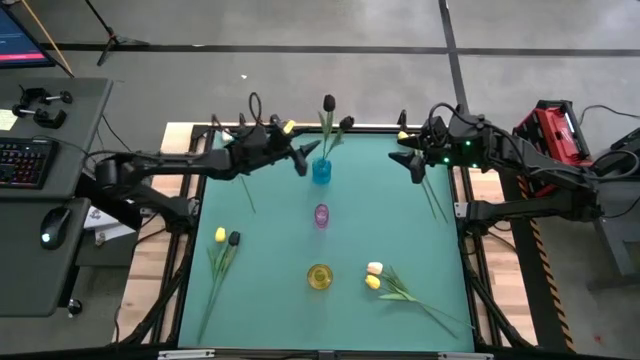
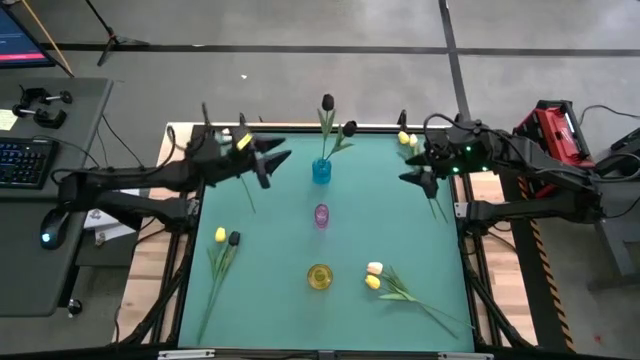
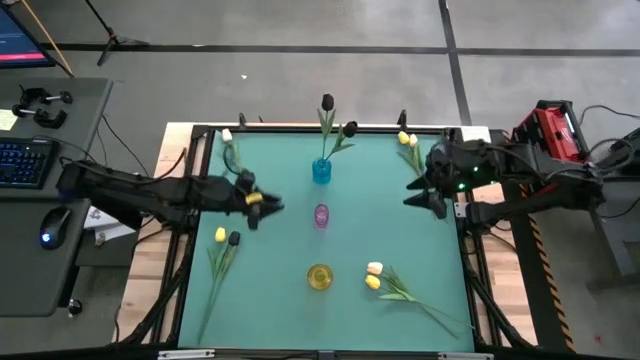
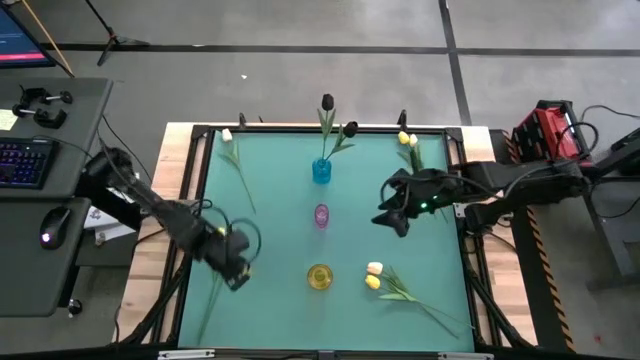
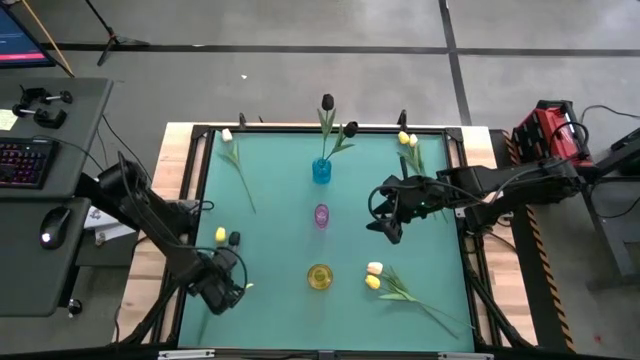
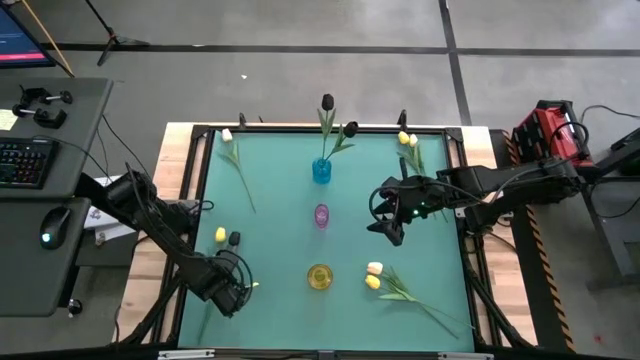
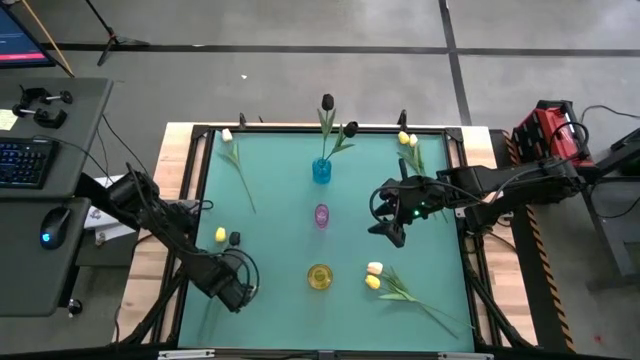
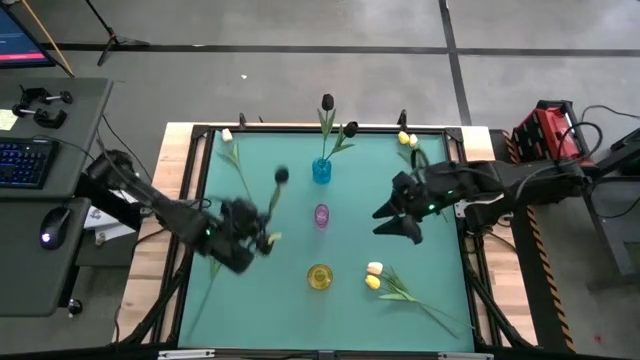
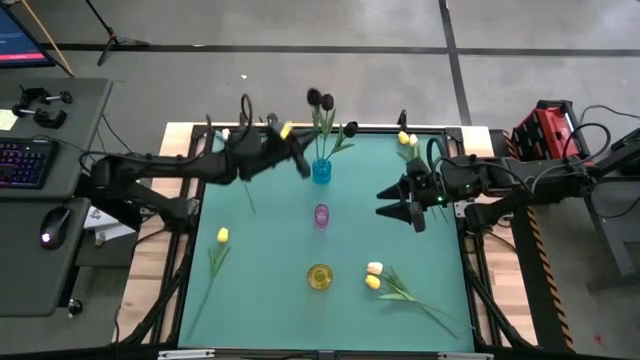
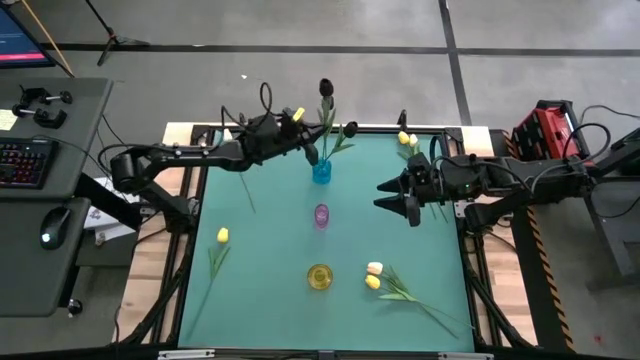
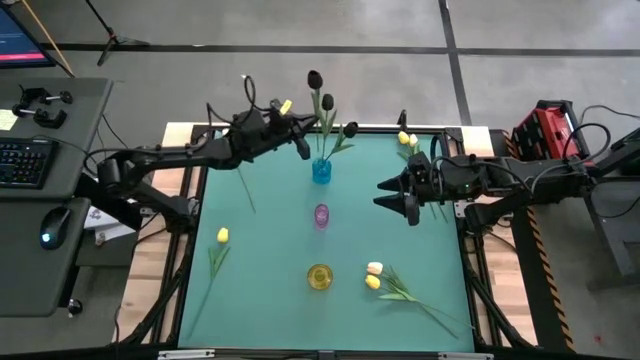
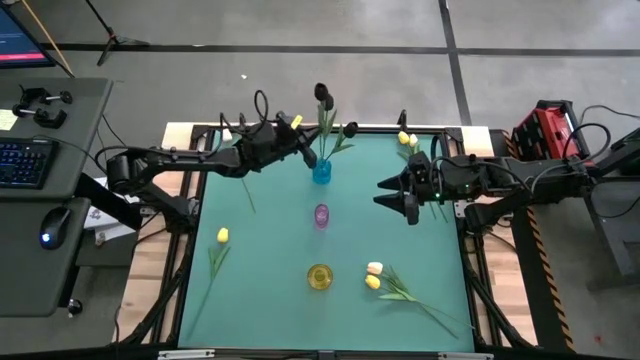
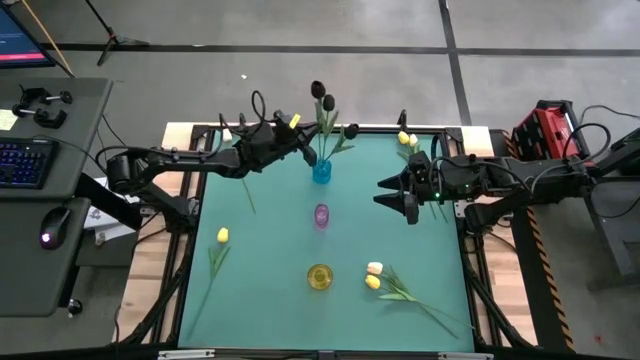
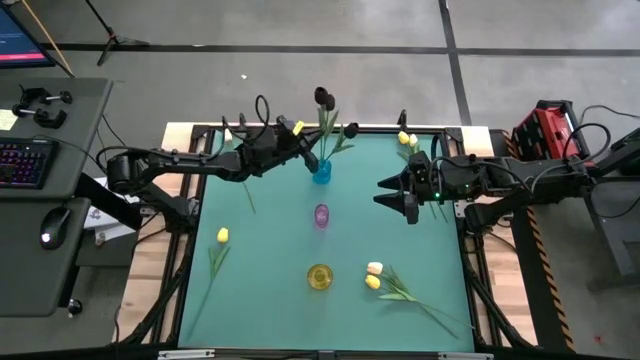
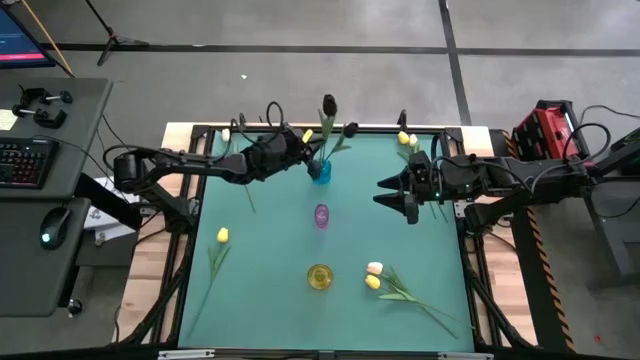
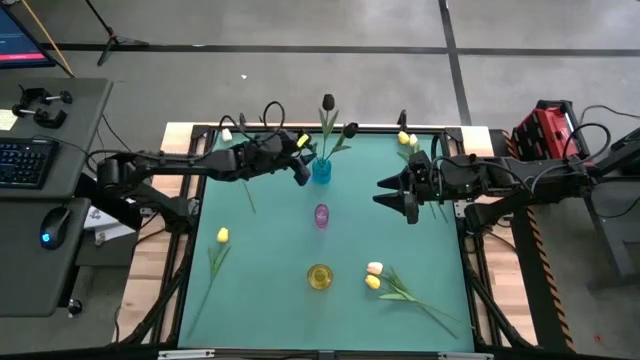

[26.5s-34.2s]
Task: Sort flowers into vase by color
Put the black tulip into the blue vase

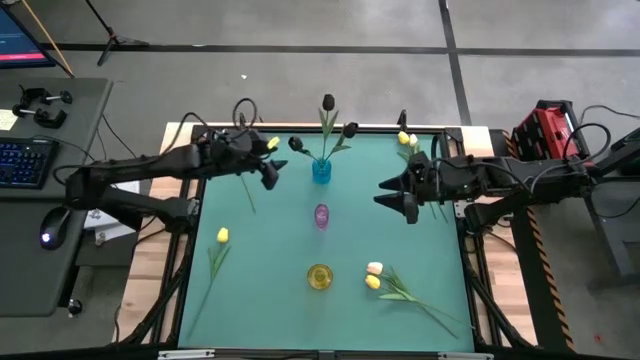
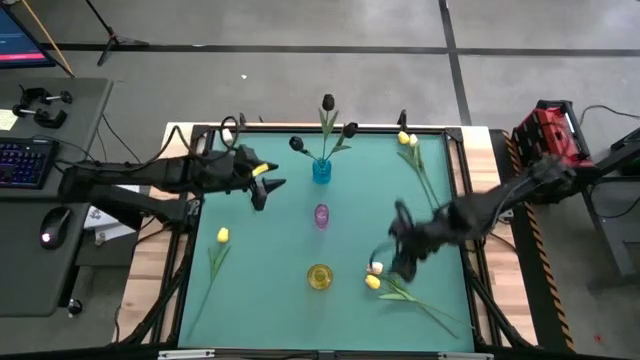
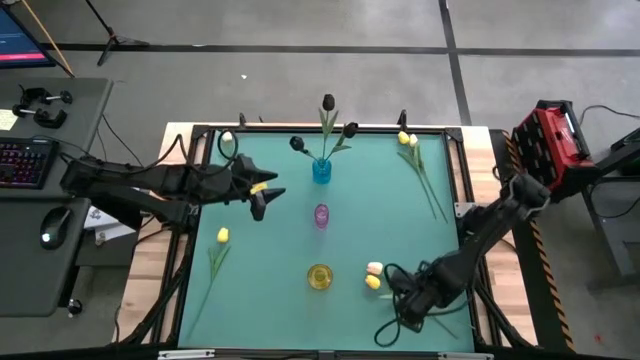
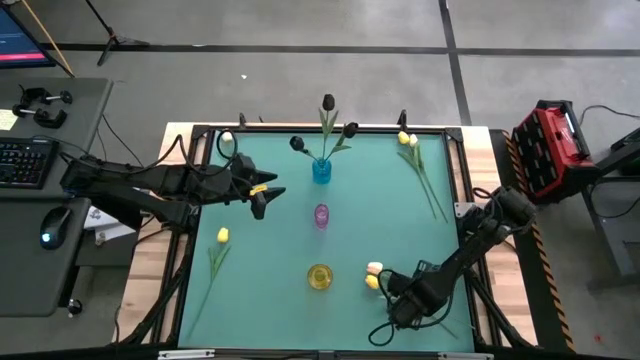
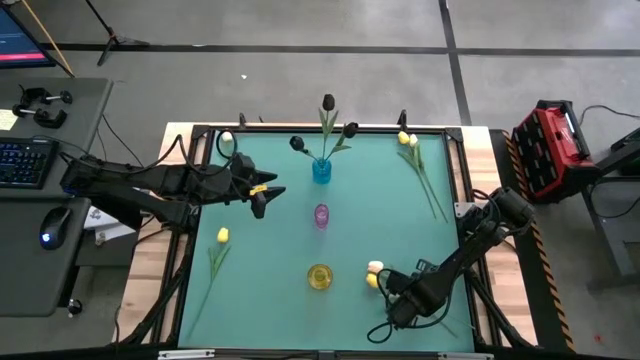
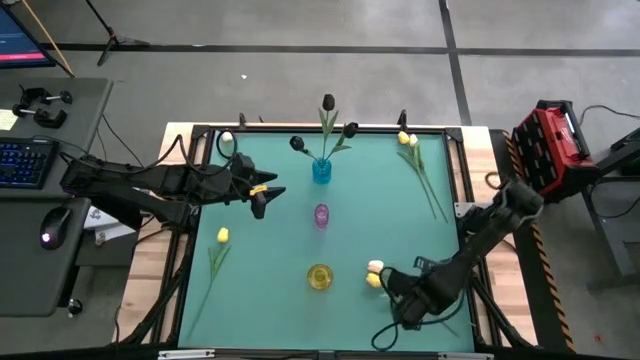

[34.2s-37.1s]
Put the bottom yellow tulip into the violet vase

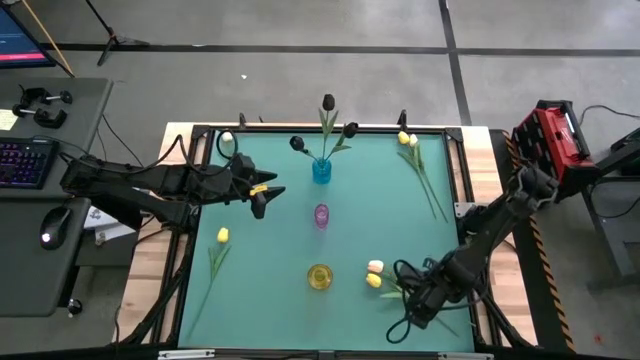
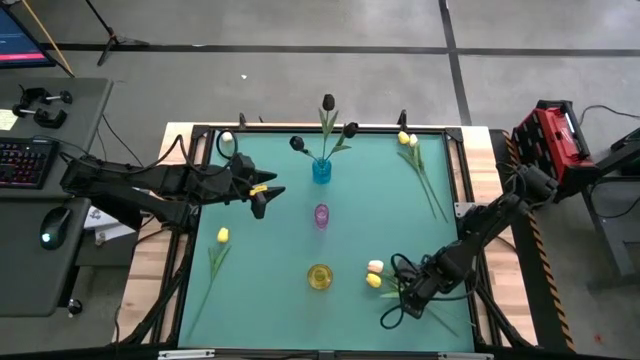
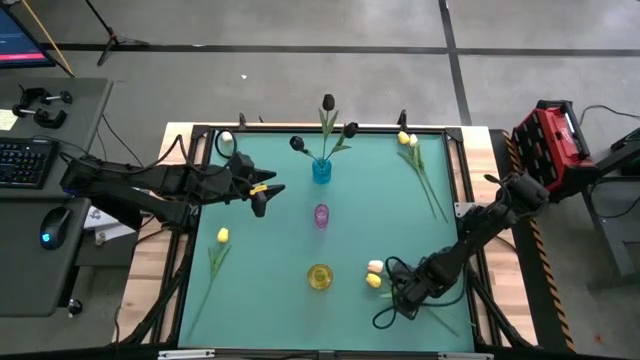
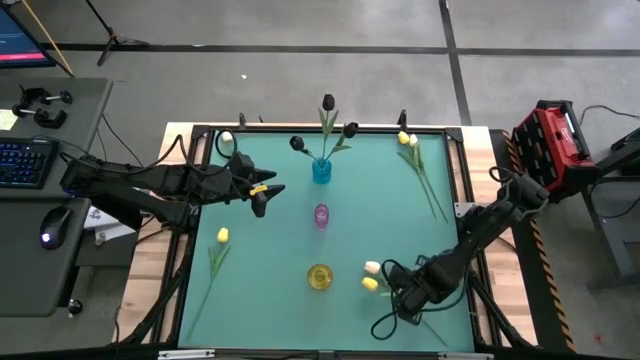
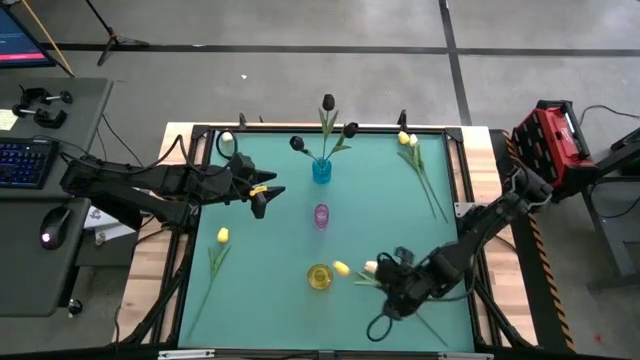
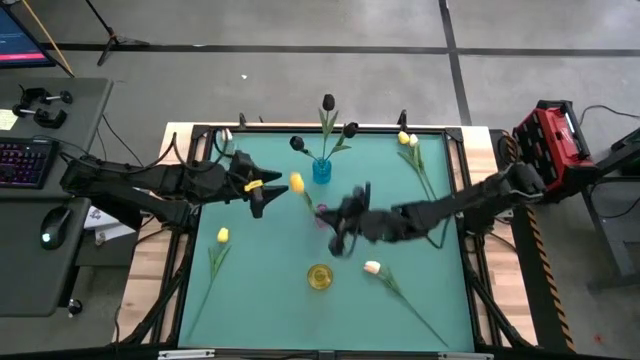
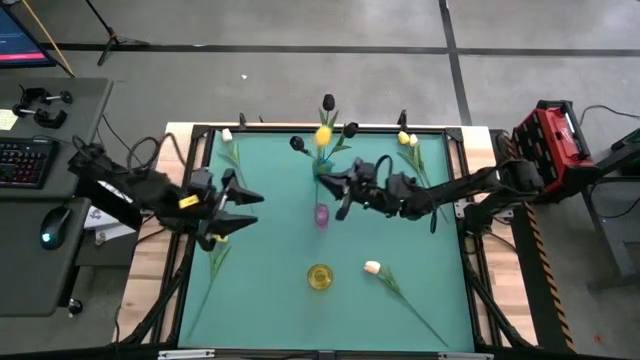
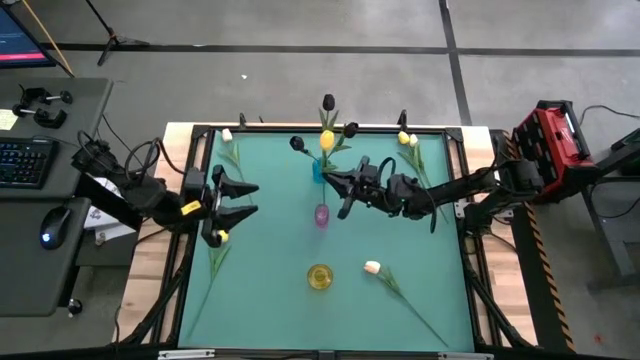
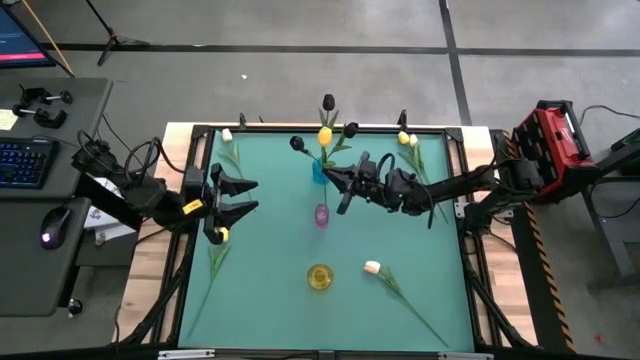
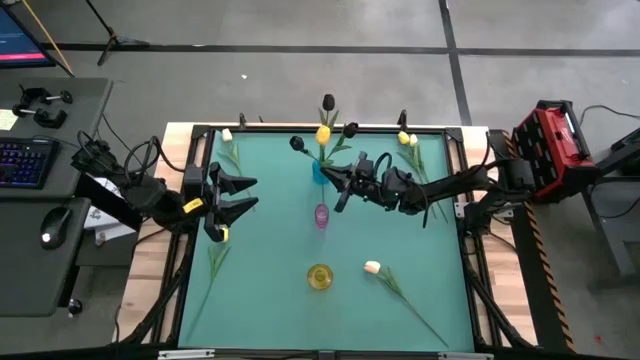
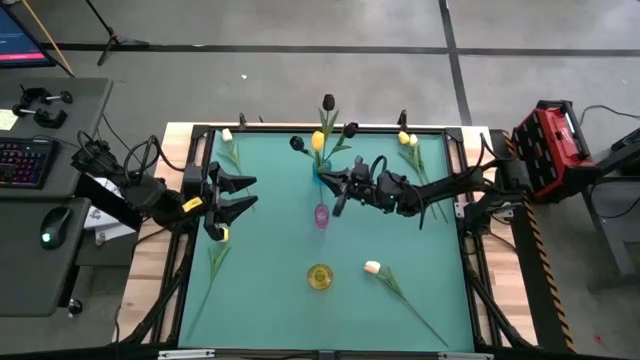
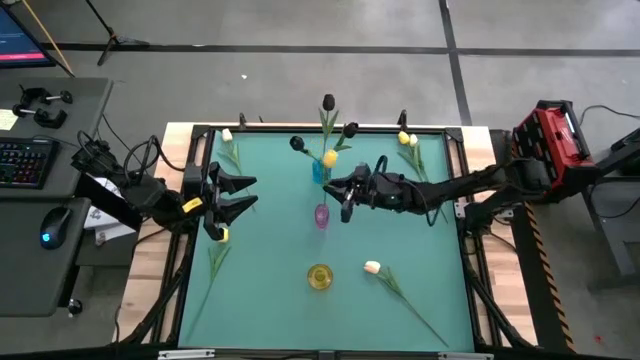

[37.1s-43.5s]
Put the bottom yellow tulip into the violet vase

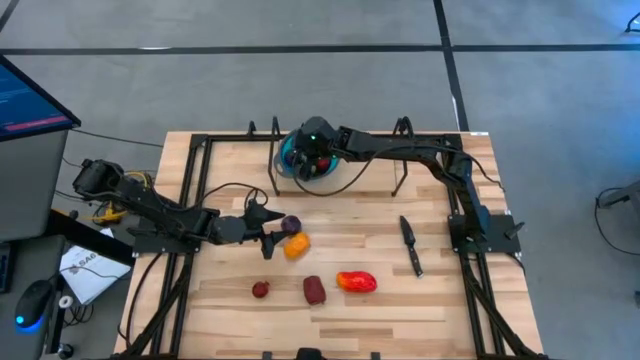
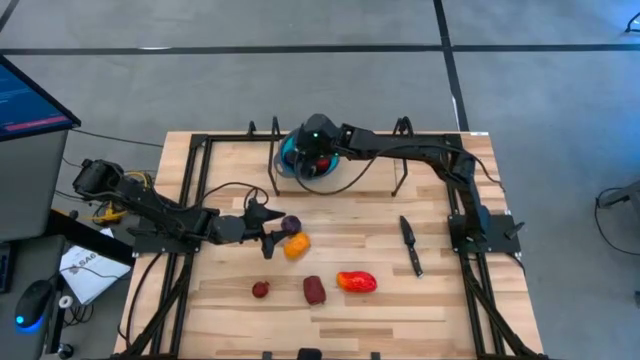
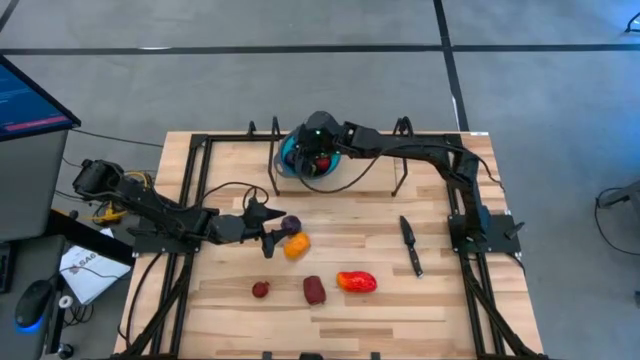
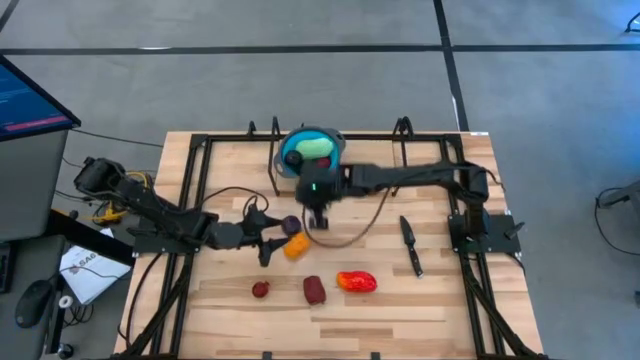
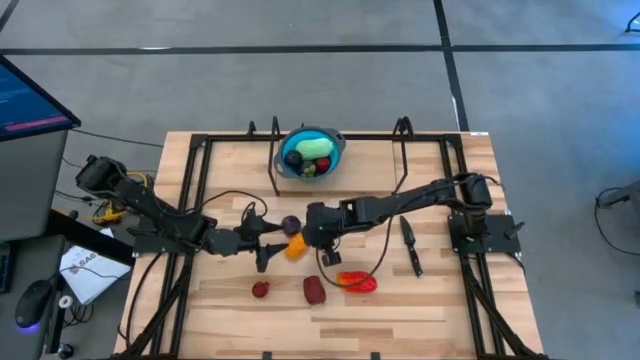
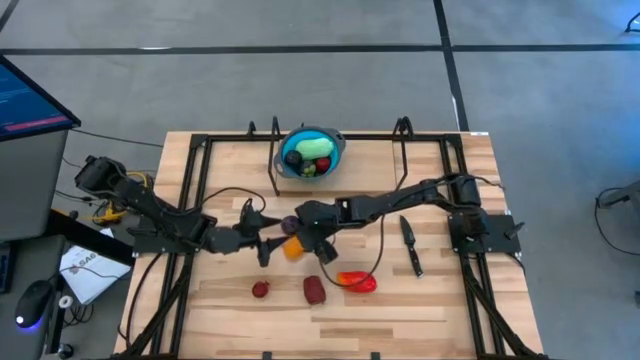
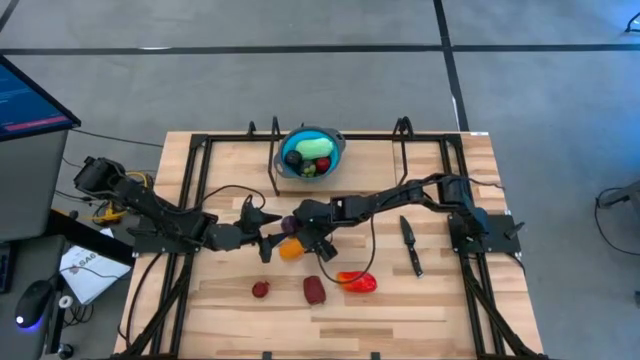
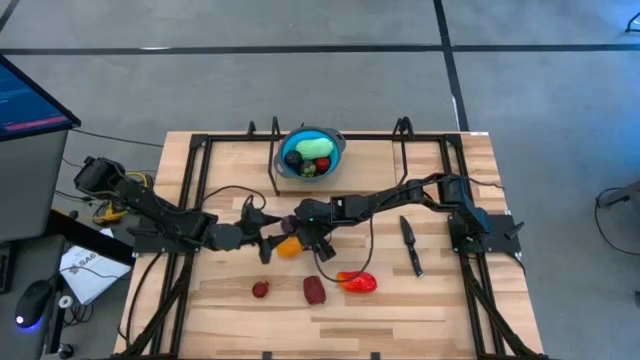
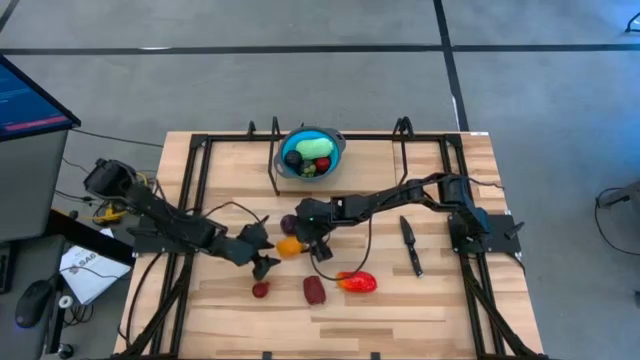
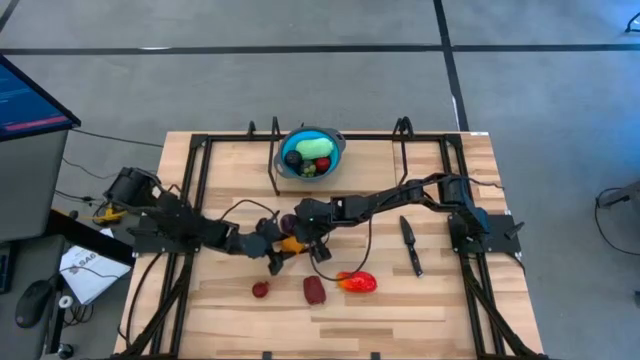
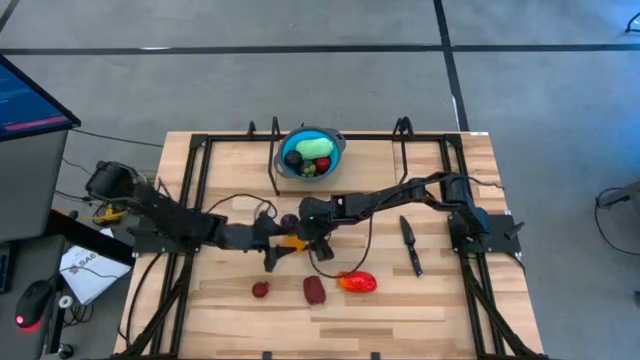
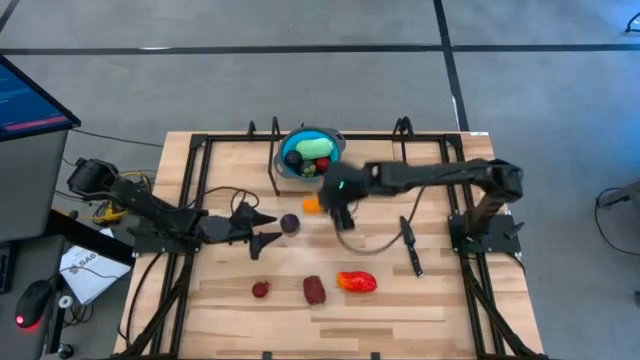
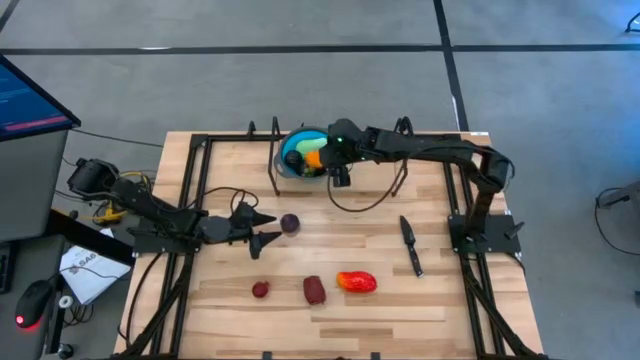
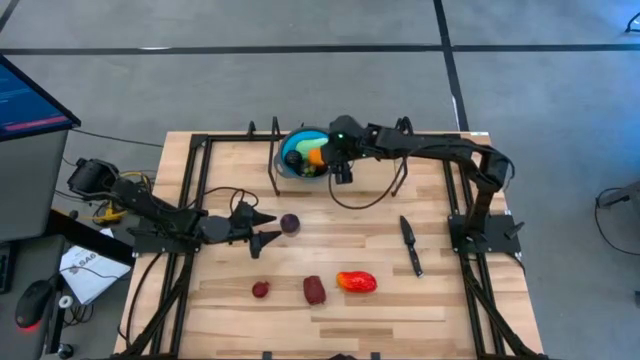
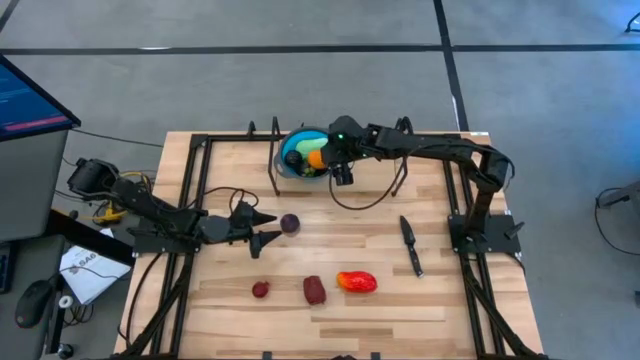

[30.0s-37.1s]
Task: Pick & Place Fruit
Put the yellow mango into the blue strainer bowl on the shelf
